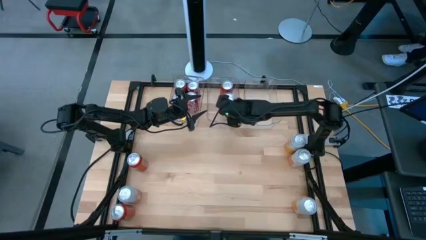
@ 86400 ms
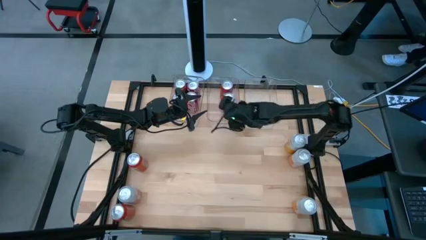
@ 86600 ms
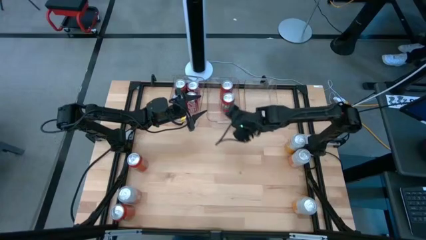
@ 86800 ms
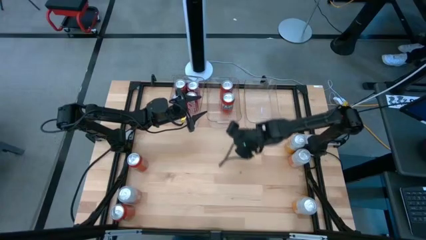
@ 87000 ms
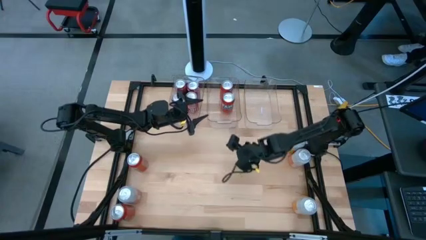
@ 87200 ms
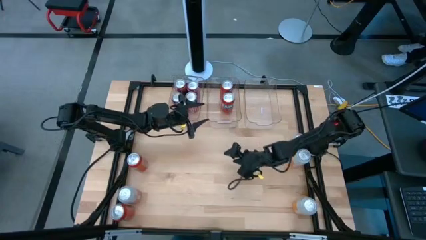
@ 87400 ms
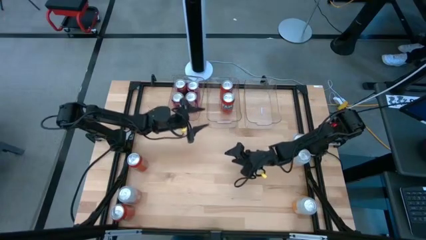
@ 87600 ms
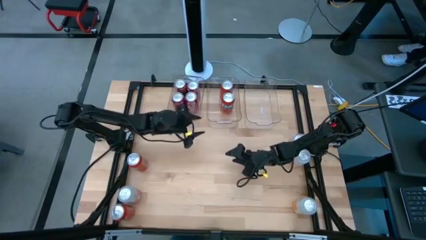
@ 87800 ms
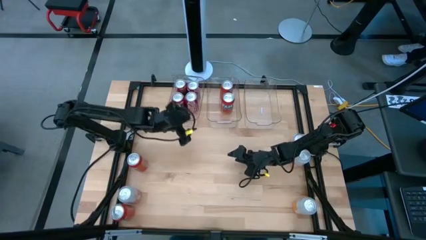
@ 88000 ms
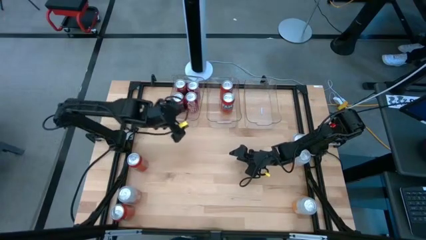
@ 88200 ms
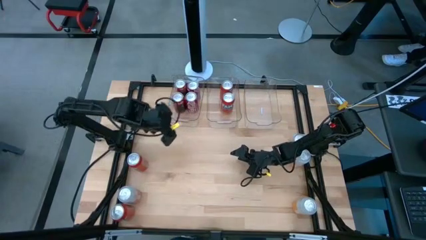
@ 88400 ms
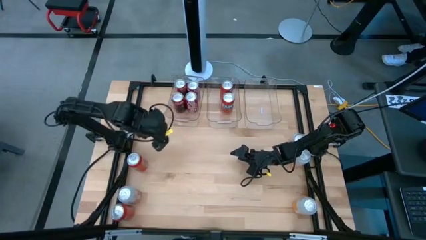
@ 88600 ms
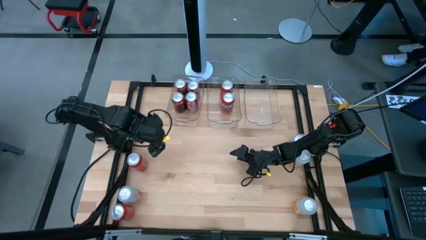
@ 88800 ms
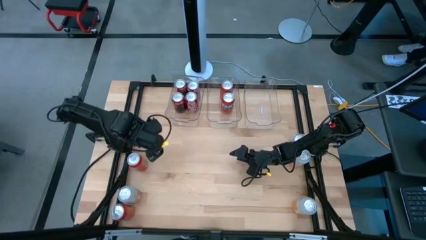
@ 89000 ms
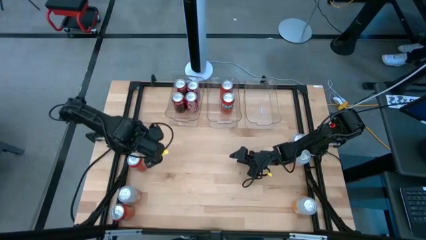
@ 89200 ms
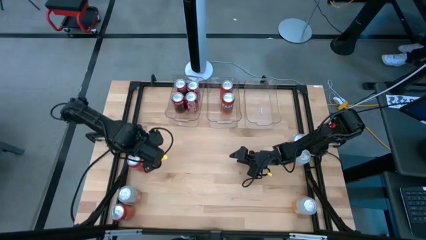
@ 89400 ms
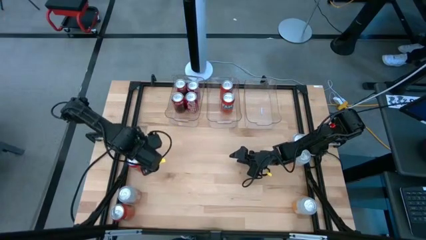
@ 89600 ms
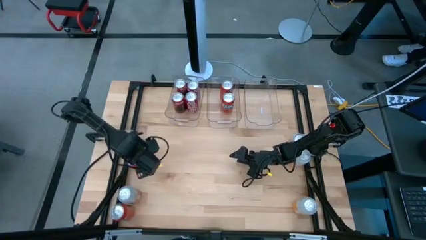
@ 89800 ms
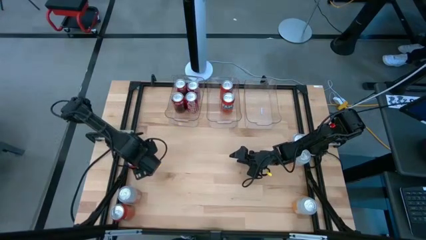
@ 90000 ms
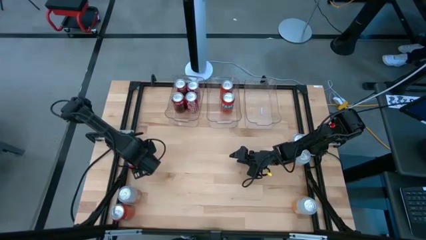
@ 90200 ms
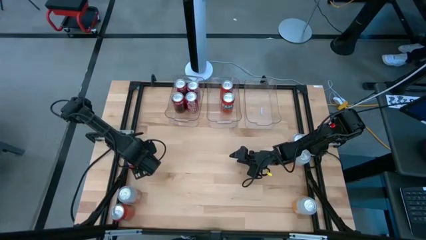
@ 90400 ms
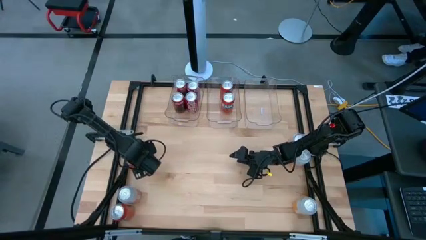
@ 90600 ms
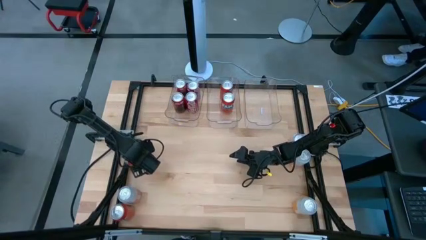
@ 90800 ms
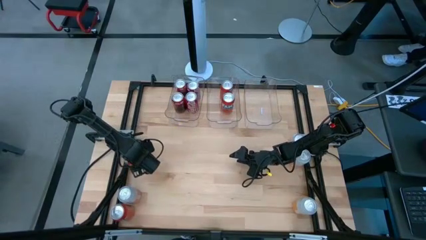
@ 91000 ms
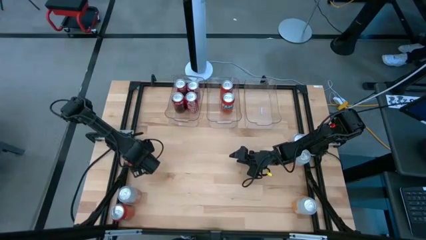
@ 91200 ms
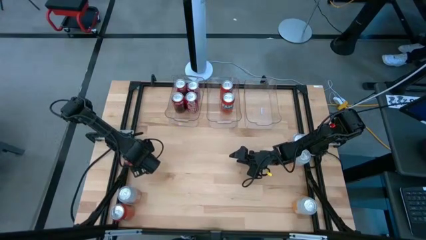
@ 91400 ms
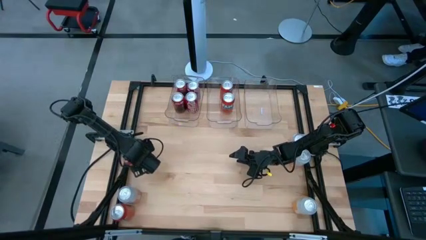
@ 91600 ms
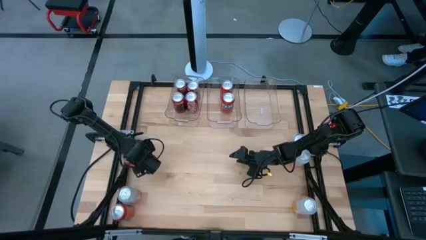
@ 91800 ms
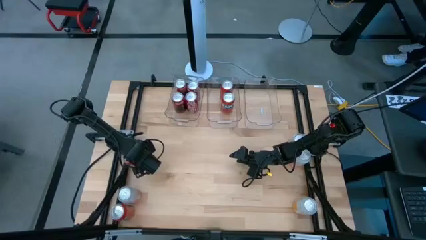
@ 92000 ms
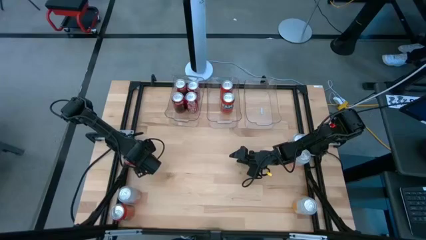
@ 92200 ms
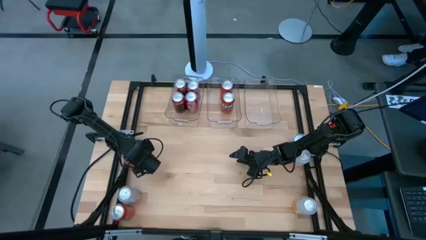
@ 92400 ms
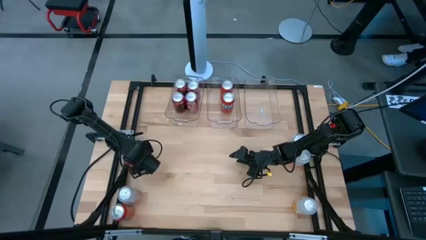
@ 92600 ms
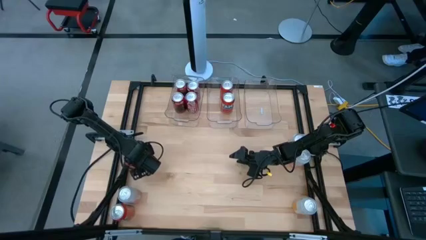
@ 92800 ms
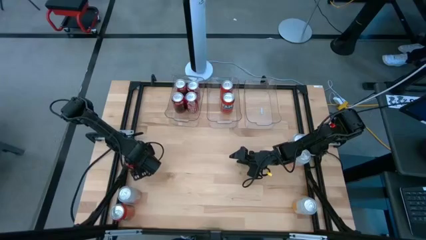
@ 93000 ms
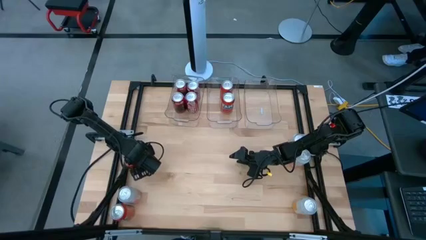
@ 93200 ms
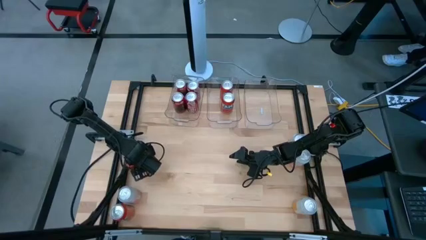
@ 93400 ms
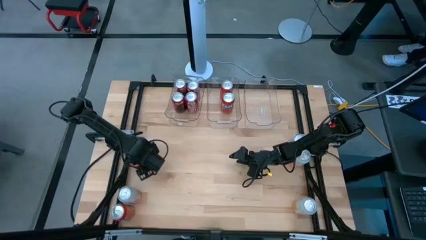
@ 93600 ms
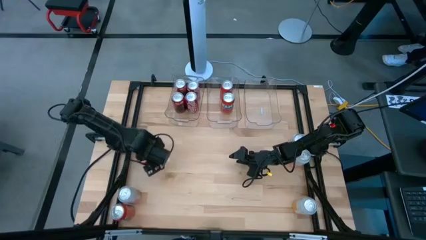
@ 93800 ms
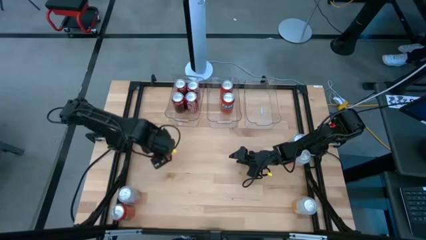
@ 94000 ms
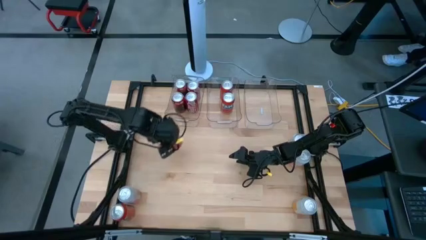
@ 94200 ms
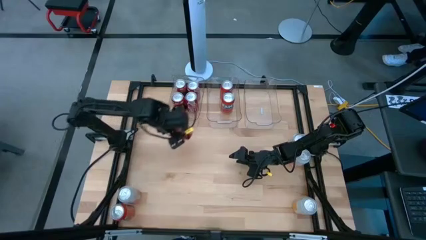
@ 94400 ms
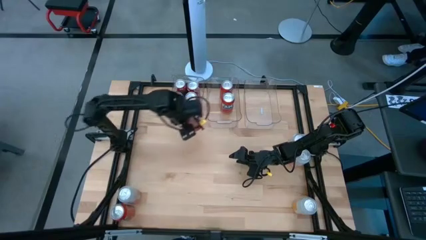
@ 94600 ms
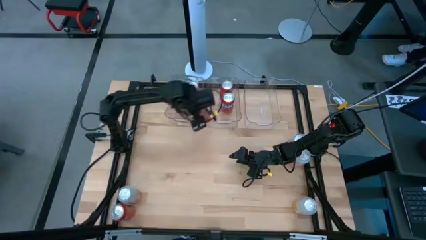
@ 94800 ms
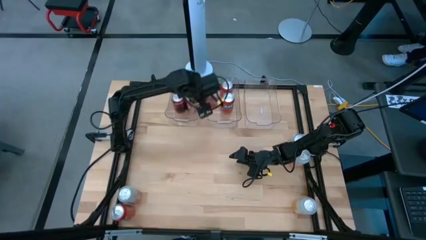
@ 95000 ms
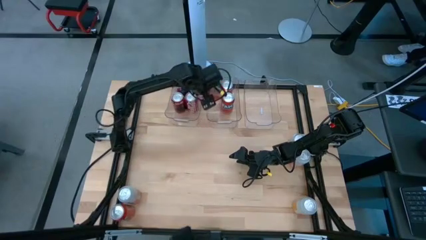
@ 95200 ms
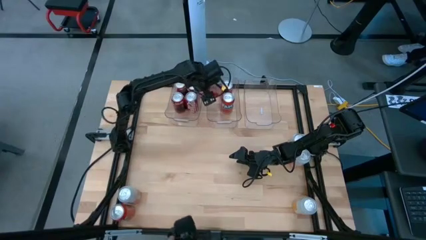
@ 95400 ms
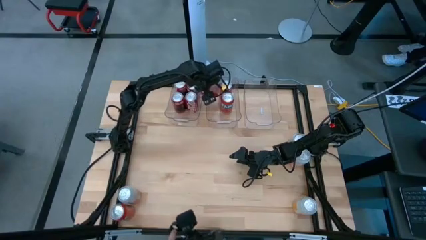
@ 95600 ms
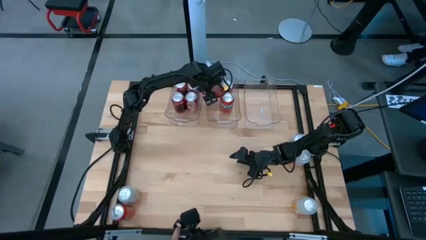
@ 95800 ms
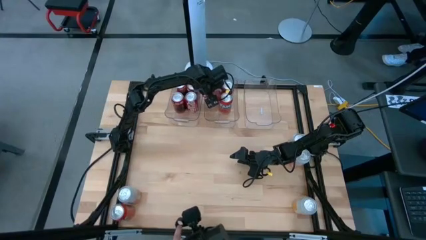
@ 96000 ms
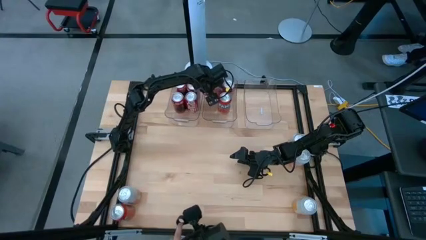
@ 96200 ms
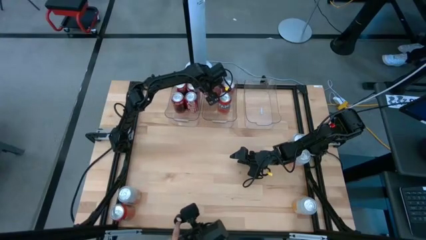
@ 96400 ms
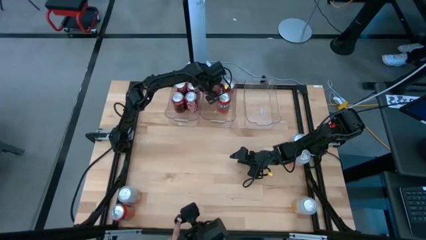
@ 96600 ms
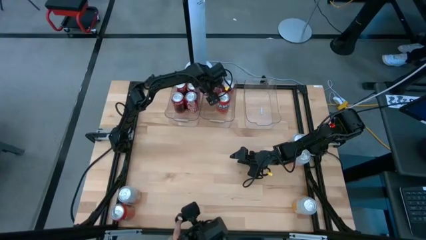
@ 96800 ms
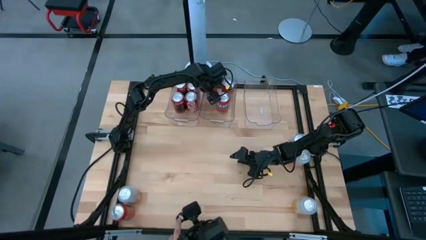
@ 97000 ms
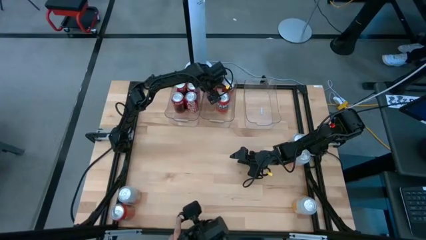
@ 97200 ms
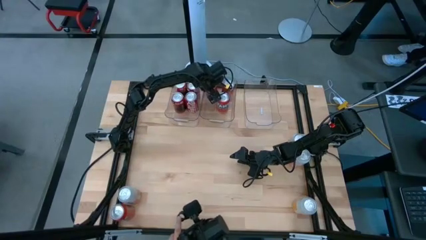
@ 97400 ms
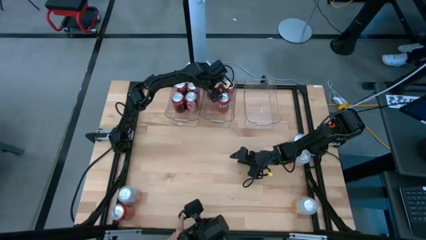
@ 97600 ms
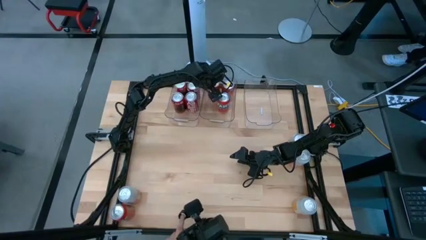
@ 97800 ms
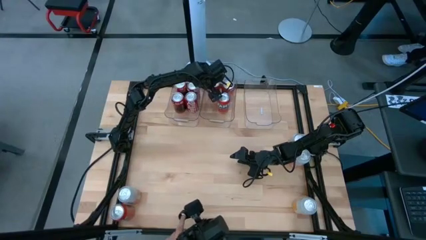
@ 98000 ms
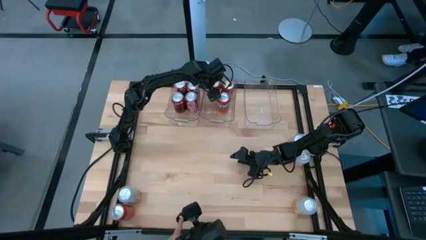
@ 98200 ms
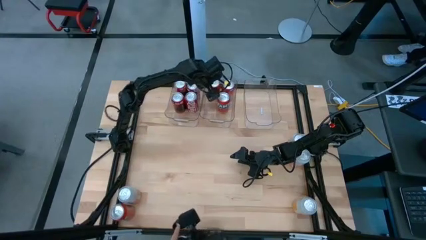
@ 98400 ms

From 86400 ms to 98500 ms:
Task: Sort soda cans
Put the top orange soda can into the middle transparent bin

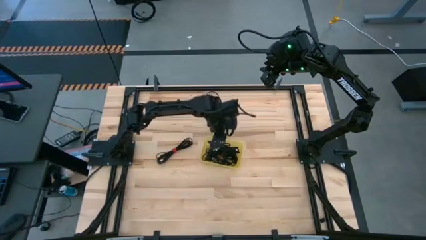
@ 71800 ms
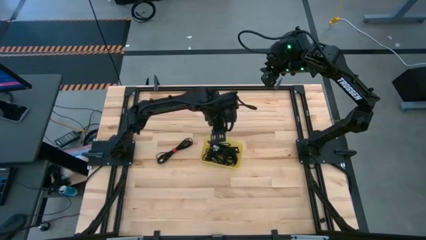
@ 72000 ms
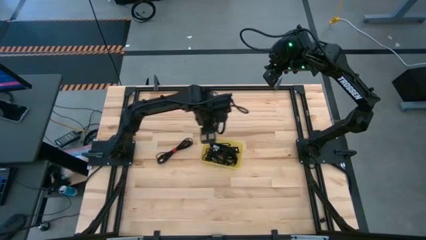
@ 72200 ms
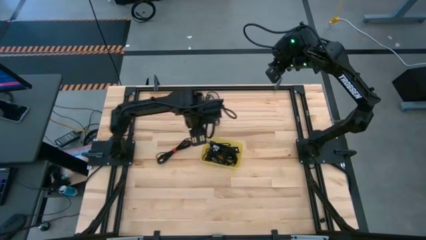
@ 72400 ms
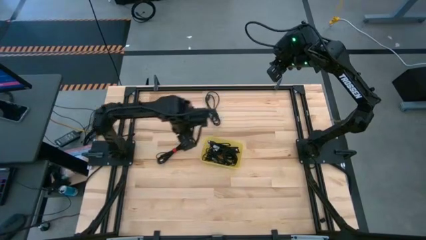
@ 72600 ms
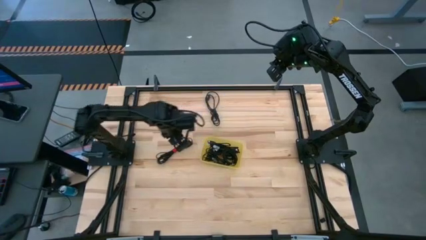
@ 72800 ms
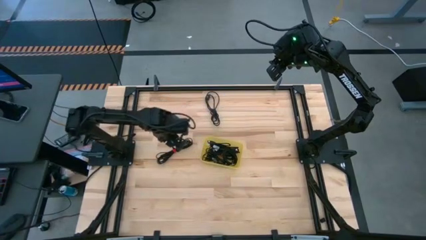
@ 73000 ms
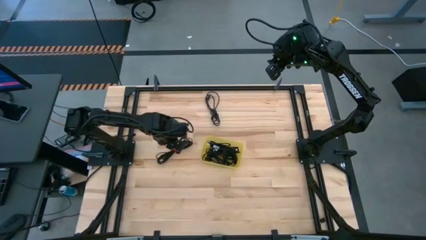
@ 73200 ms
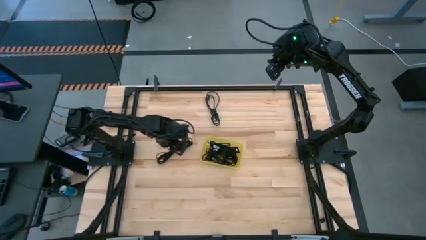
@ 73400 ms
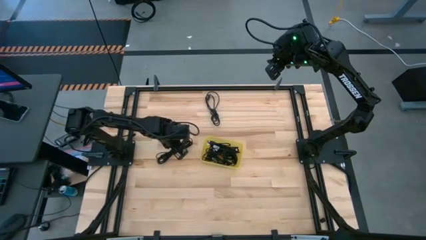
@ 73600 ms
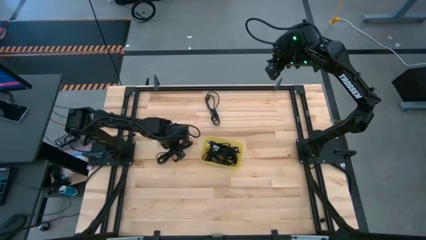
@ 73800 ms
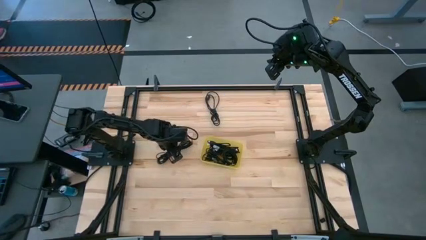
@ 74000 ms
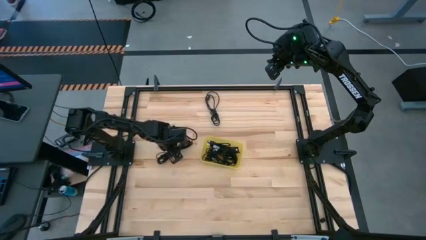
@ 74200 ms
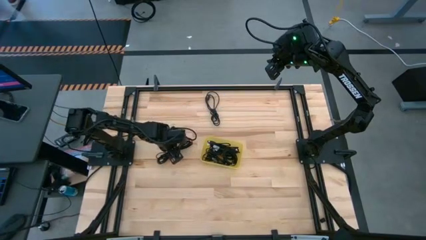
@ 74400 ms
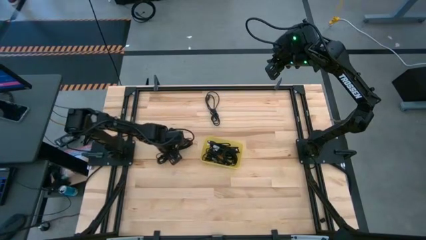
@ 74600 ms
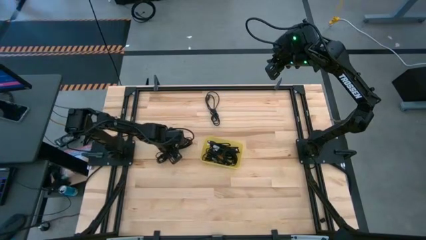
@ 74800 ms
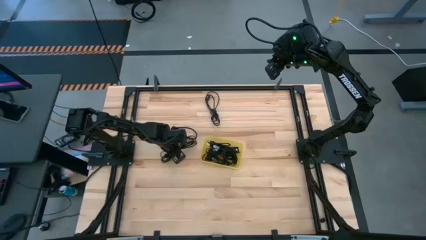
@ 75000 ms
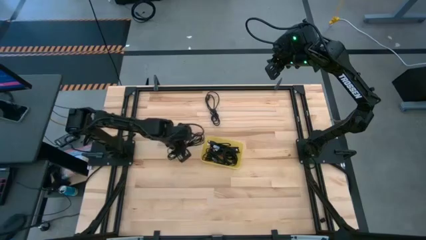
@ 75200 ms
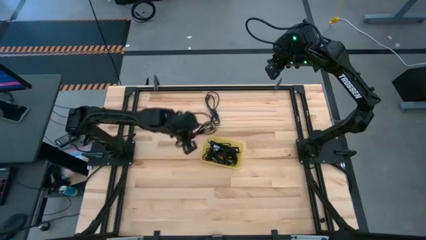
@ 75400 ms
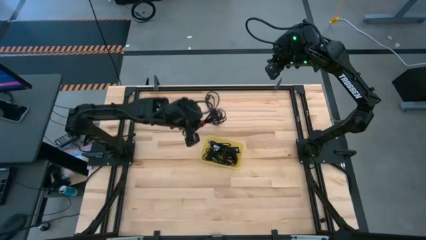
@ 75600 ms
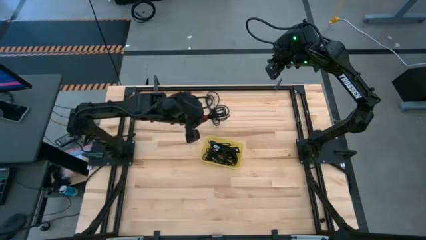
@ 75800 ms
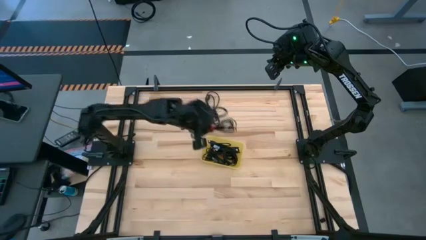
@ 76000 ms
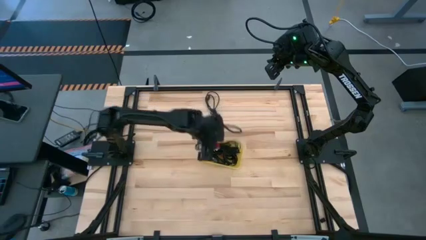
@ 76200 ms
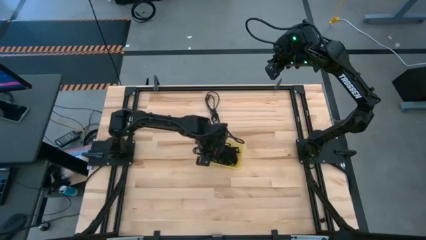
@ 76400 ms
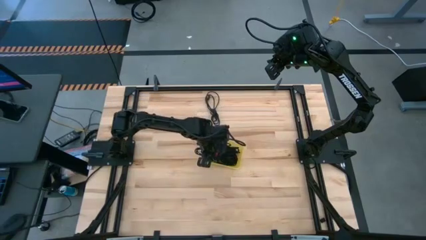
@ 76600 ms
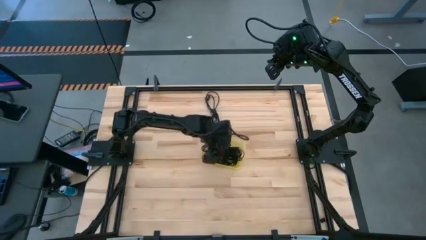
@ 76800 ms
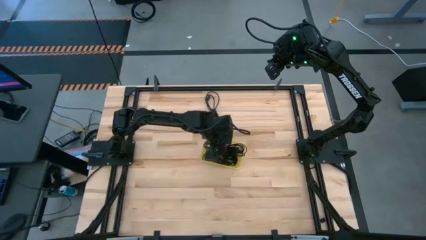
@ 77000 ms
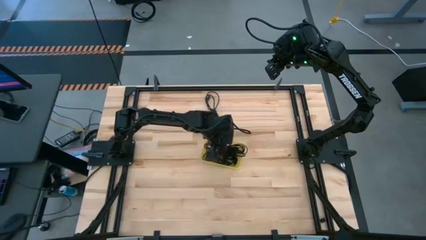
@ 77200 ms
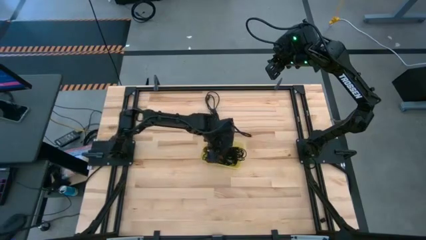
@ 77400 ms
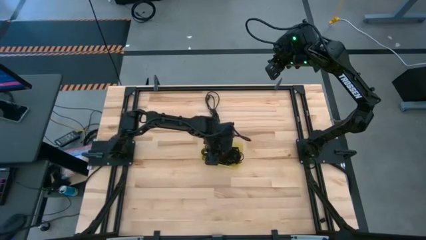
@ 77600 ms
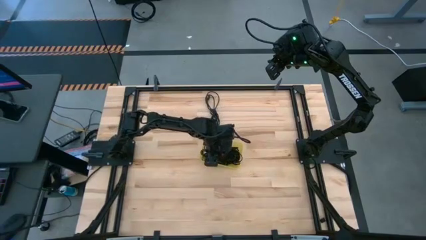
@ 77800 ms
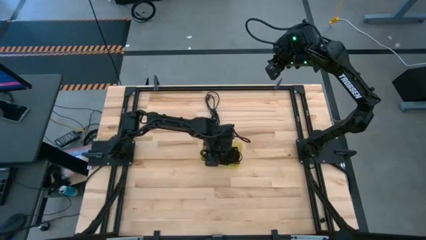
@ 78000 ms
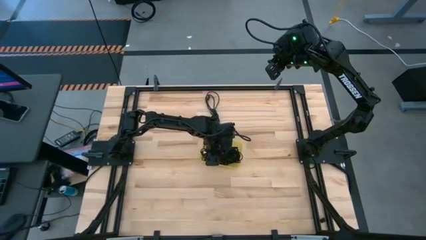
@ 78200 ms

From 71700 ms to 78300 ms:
Task: Pick and place USB-C Cables
Put the black charger cable into the yellow bin
